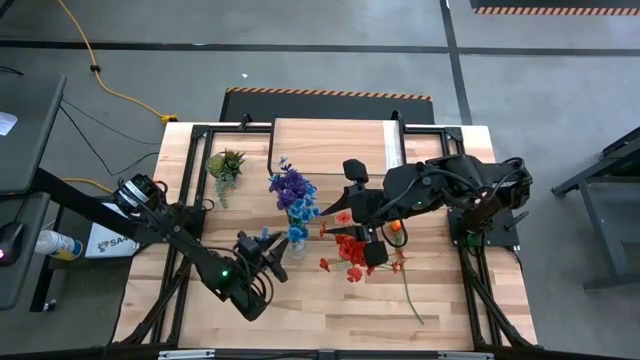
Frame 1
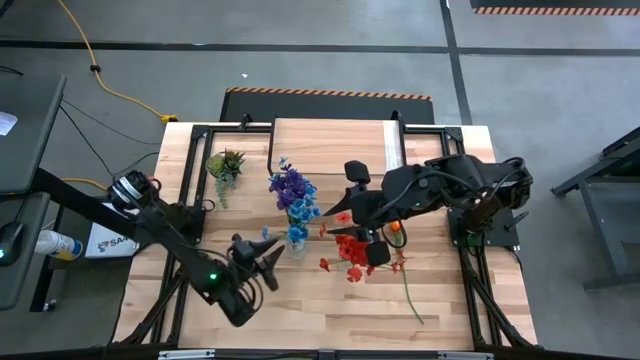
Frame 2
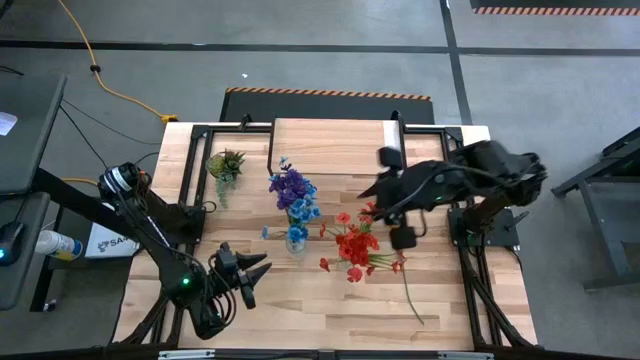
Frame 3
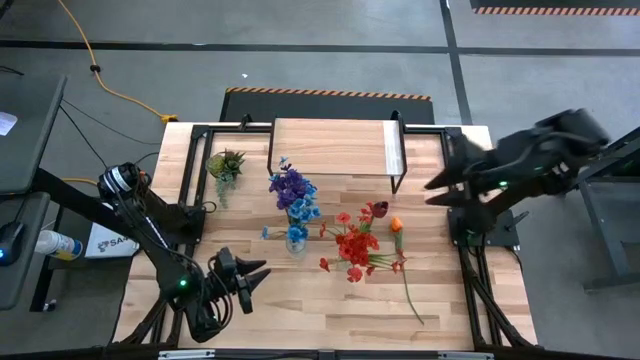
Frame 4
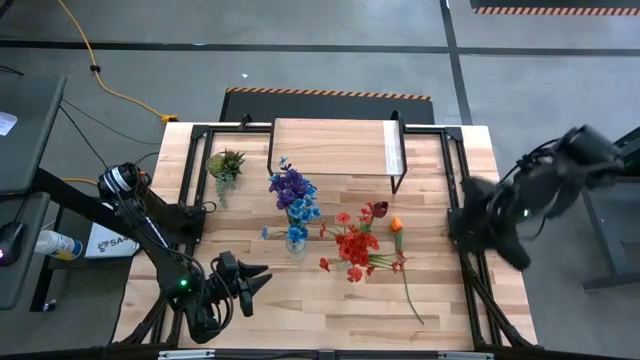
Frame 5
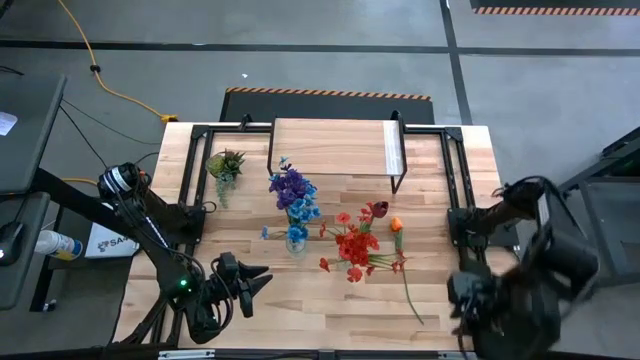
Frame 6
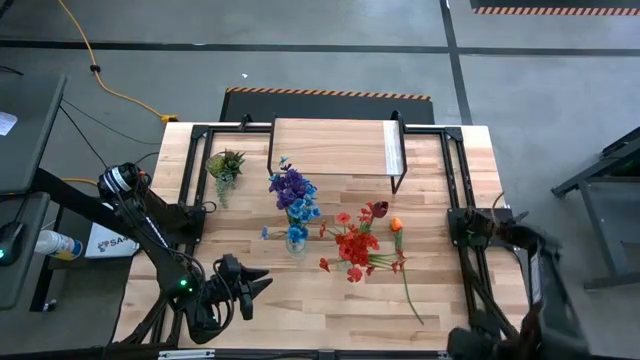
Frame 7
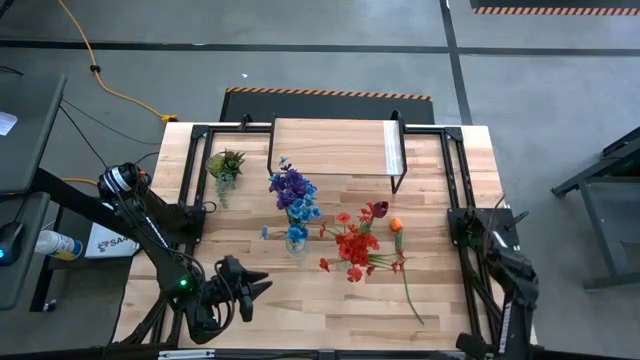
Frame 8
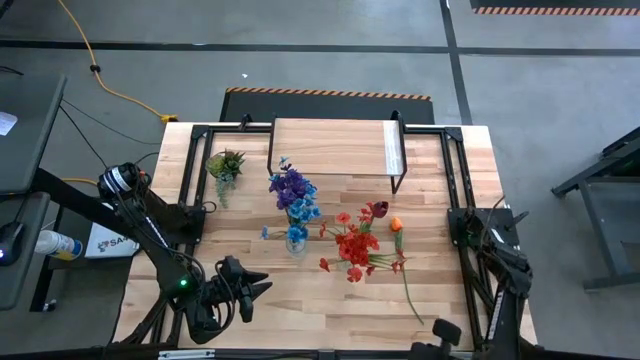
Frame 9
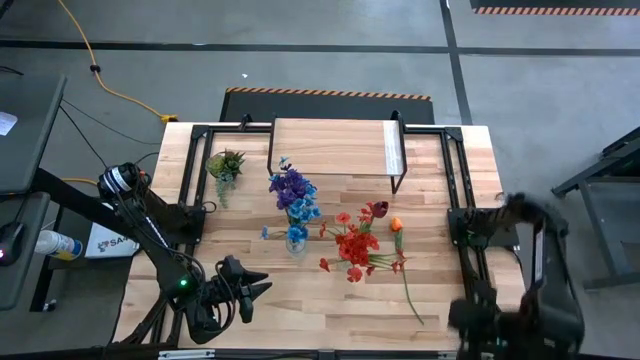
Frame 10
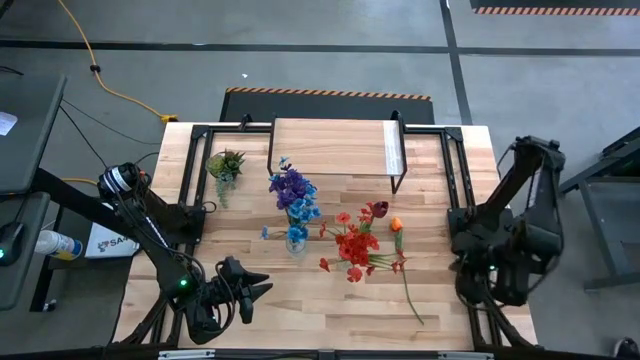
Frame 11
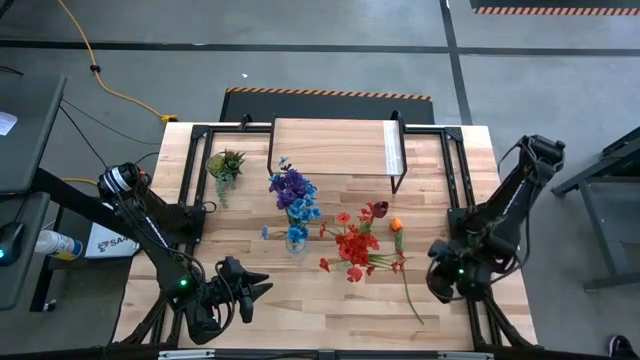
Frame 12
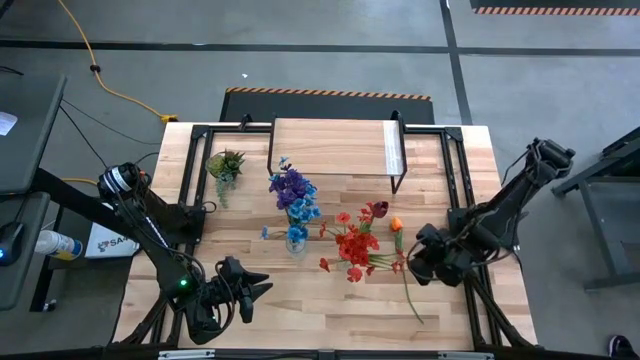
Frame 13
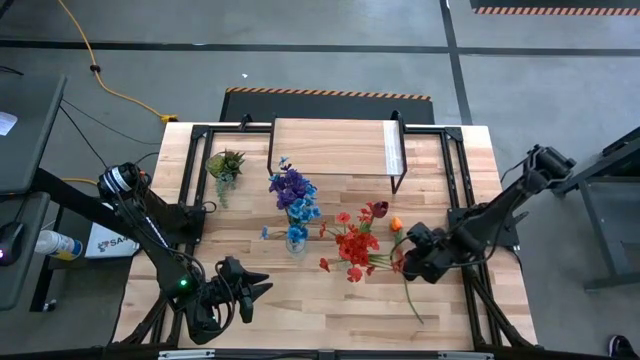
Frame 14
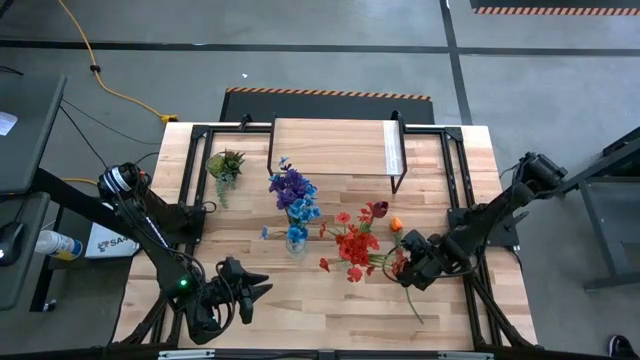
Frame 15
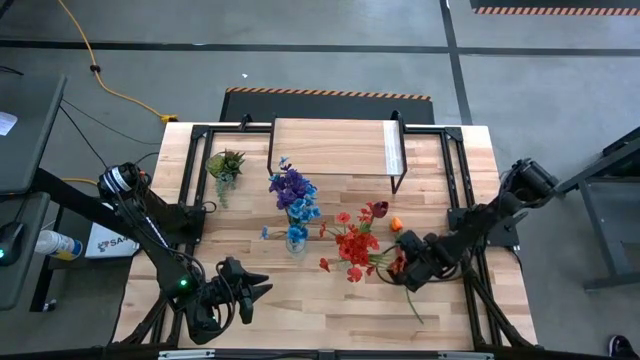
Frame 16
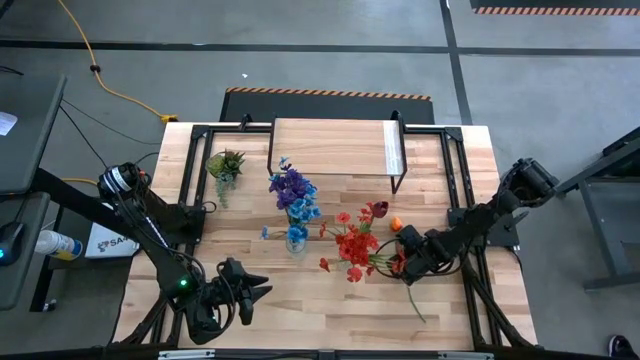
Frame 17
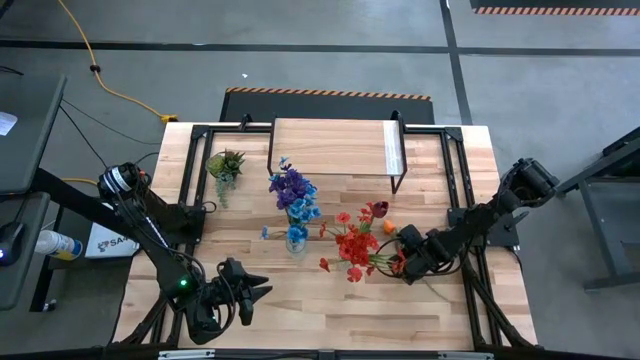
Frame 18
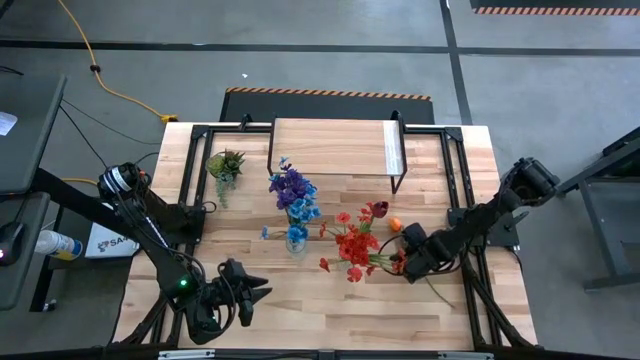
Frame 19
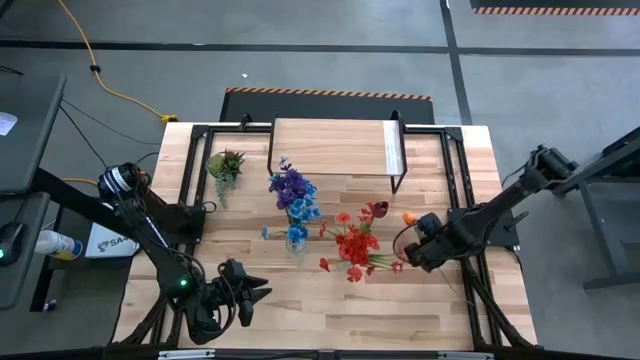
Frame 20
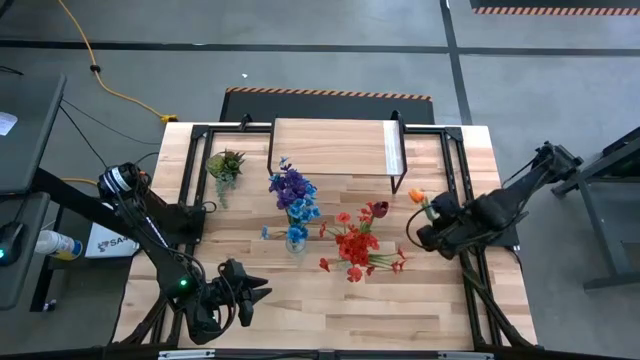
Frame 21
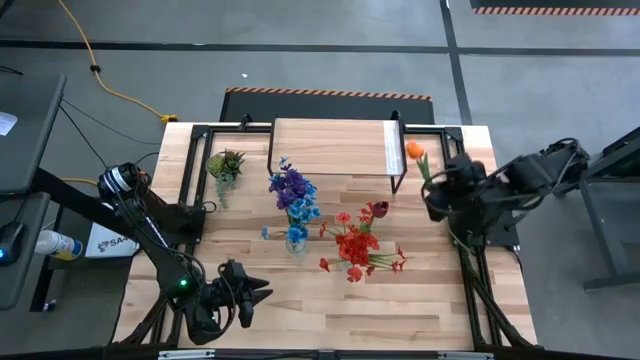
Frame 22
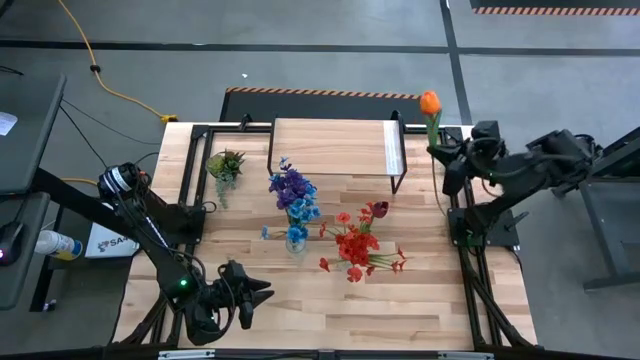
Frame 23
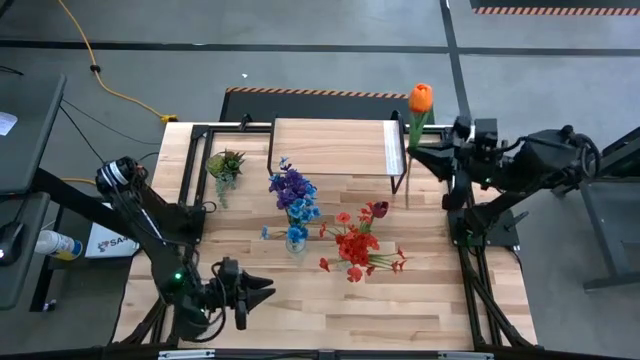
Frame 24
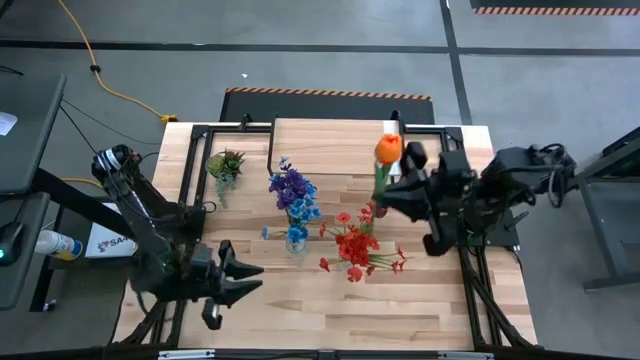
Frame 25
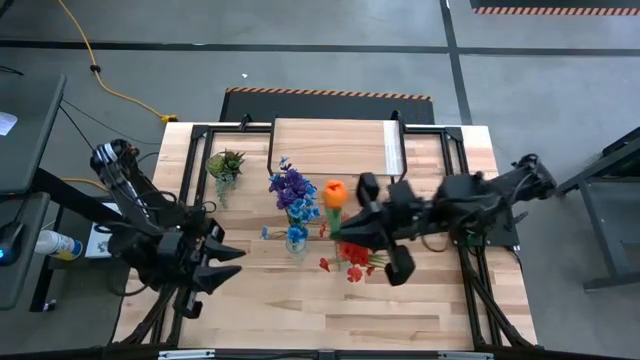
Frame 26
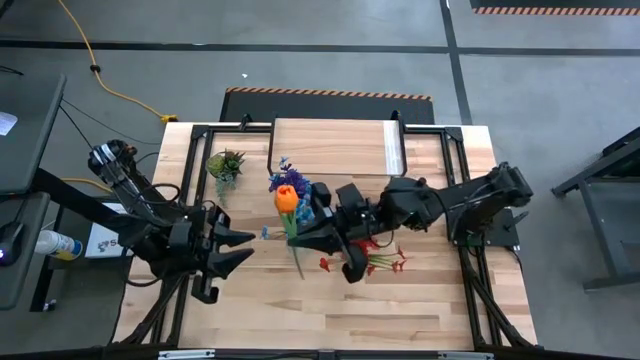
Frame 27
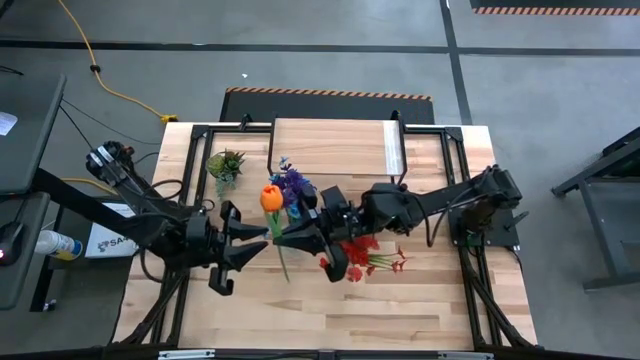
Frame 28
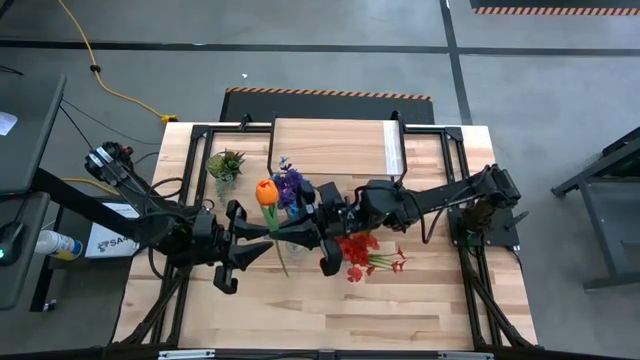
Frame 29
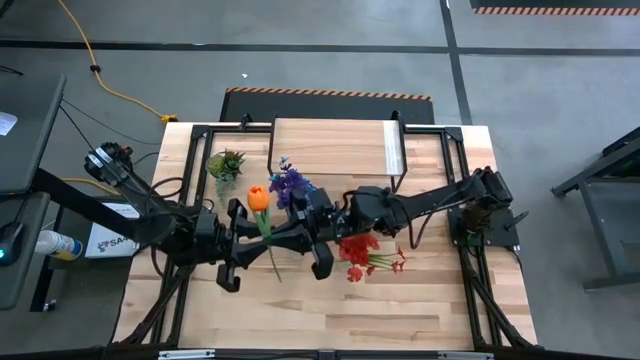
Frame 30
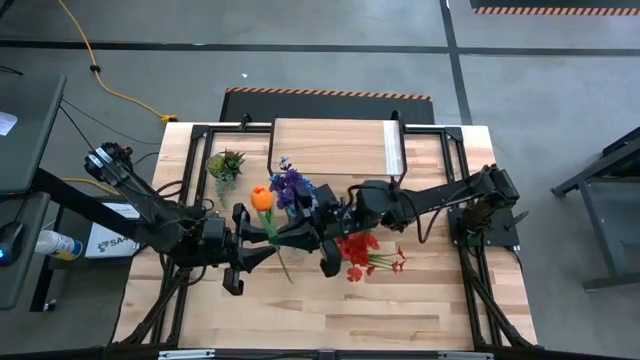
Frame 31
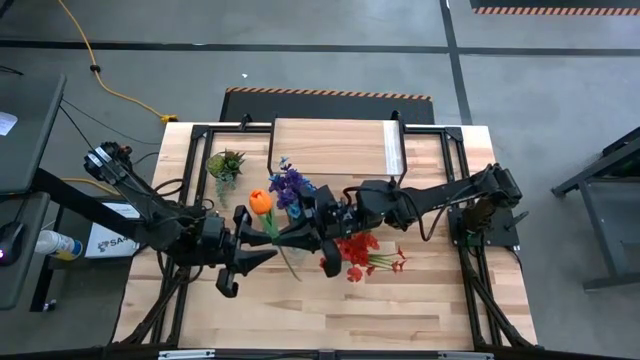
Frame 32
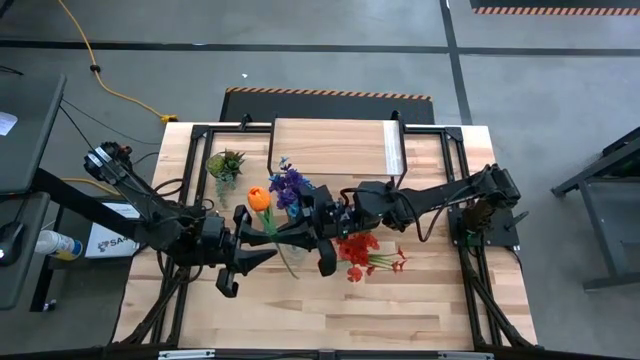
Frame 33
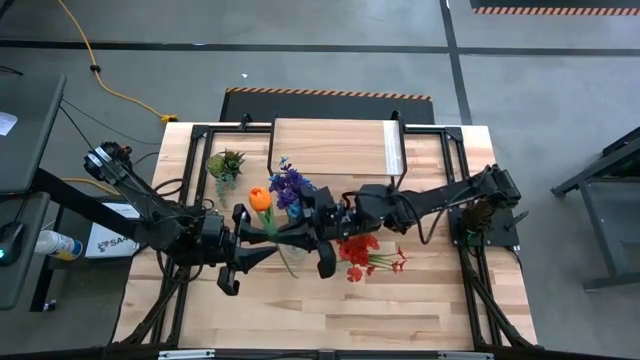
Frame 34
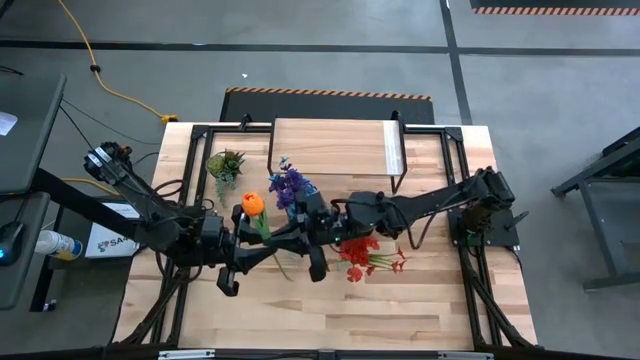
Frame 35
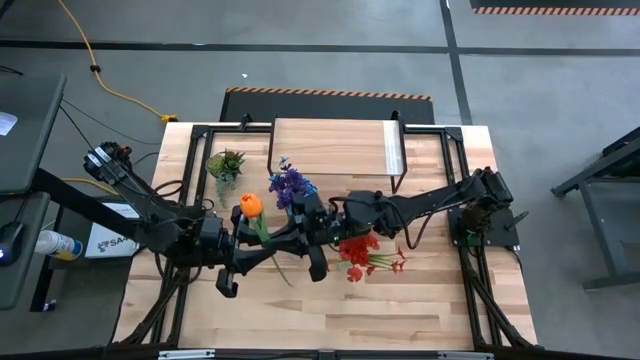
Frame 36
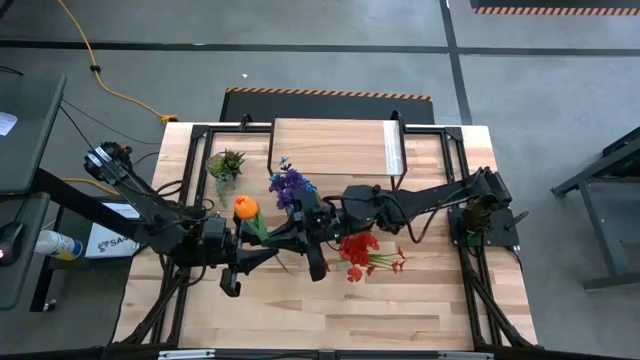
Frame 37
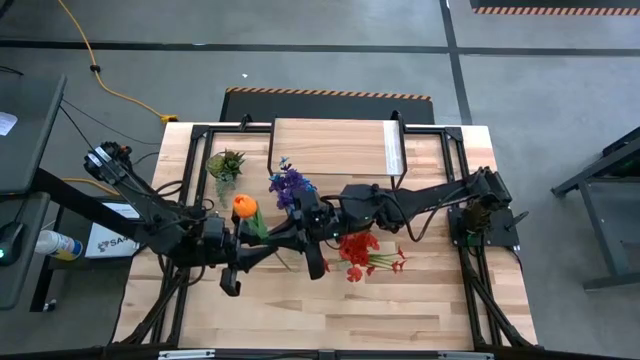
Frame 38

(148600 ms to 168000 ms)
Task: Pick and place flowers into a vace then onto a shelf
Put the orange tulip into the left transparent vase

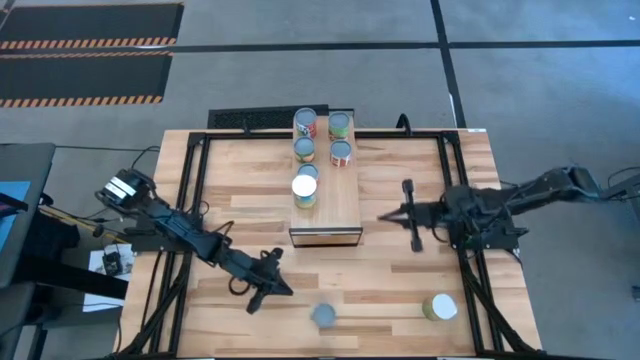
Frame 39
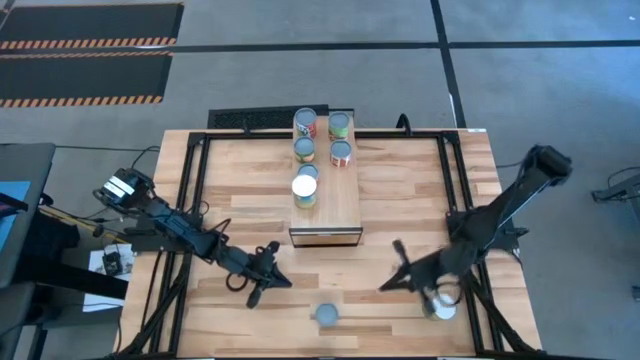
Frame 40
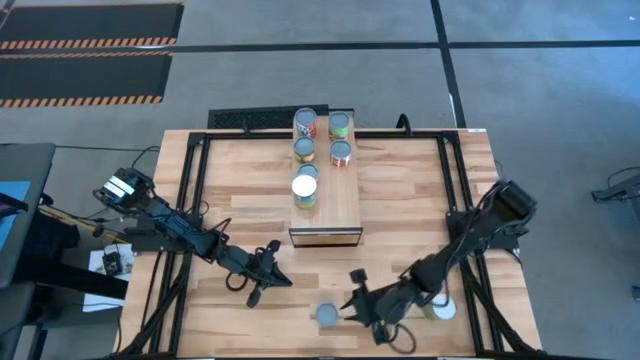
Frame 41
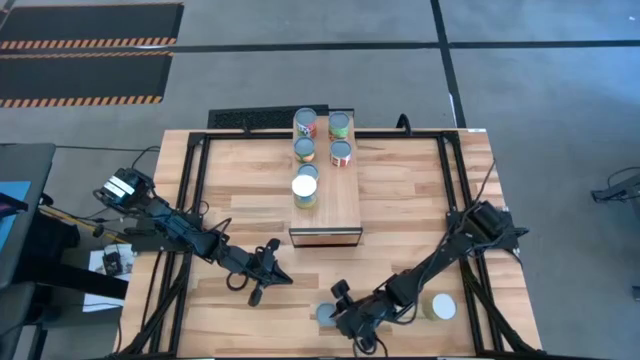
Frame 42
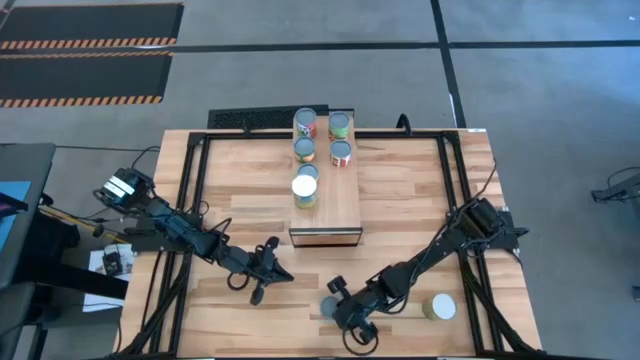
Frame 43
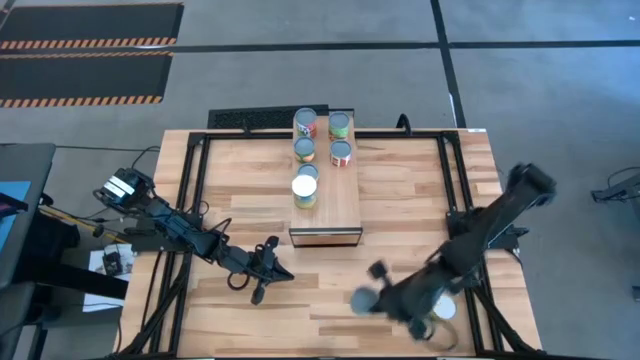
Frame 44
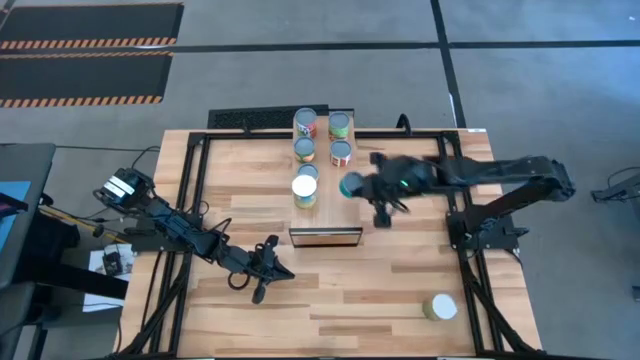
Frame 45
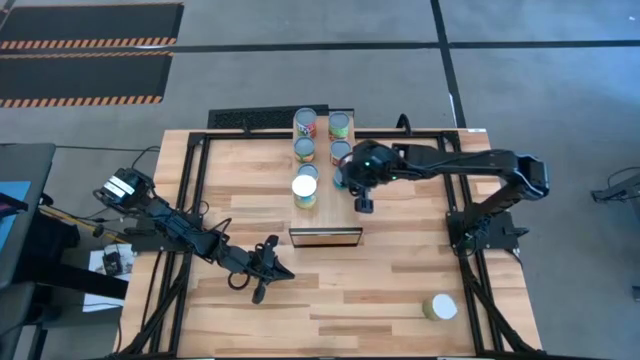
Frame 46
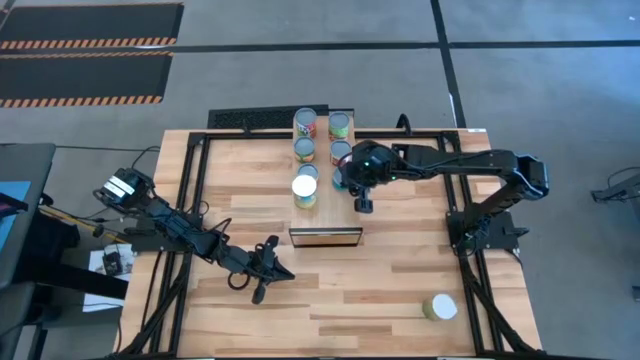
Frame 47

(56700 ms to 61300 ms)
Task: Pick and place cans onto a shelf
Put the canned tuna on the shelf aligned with other cans
